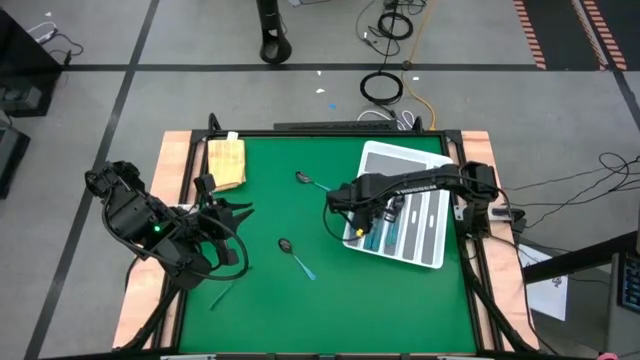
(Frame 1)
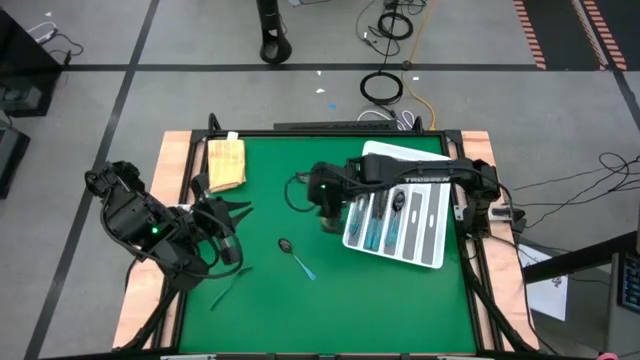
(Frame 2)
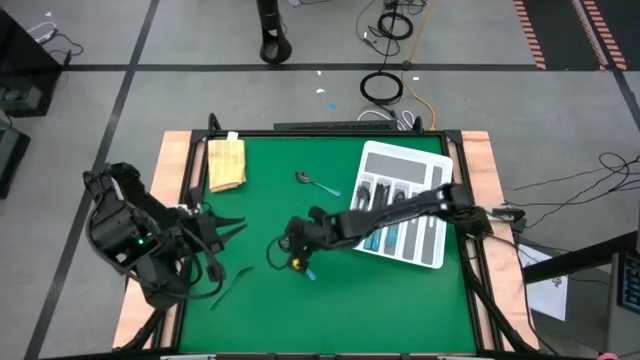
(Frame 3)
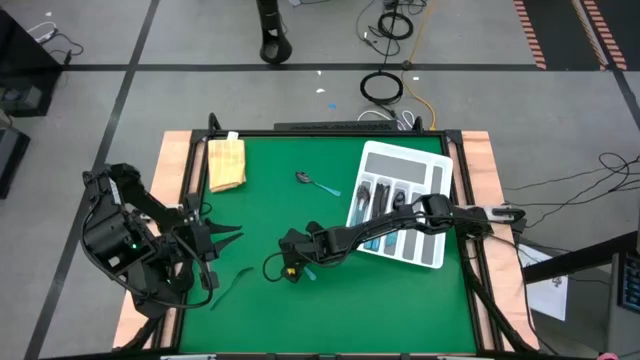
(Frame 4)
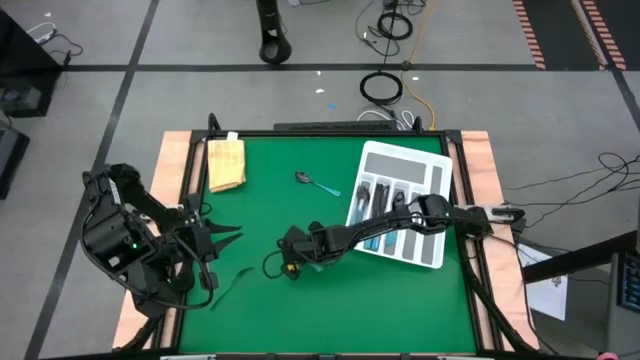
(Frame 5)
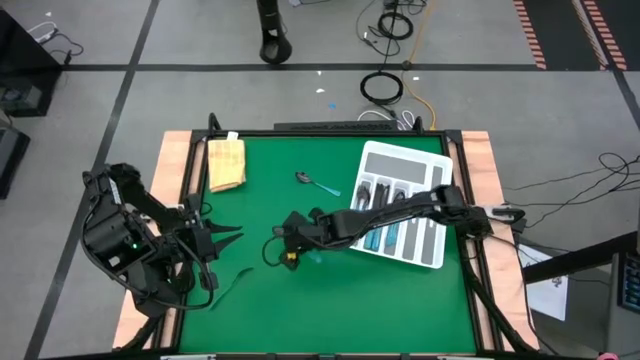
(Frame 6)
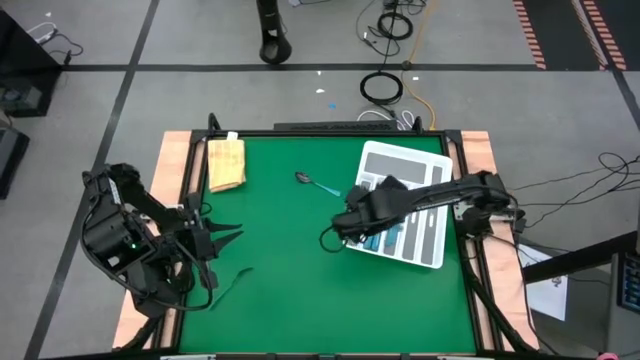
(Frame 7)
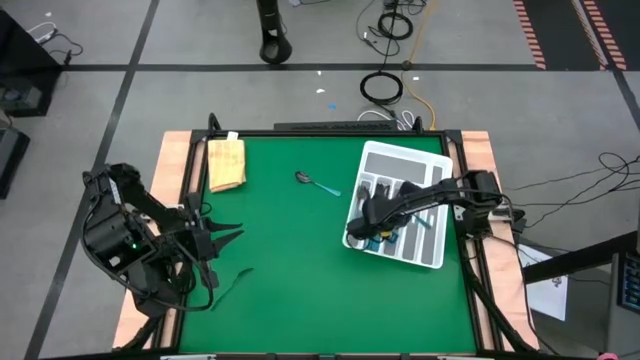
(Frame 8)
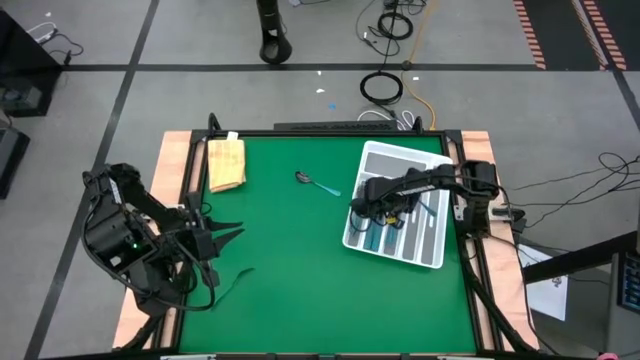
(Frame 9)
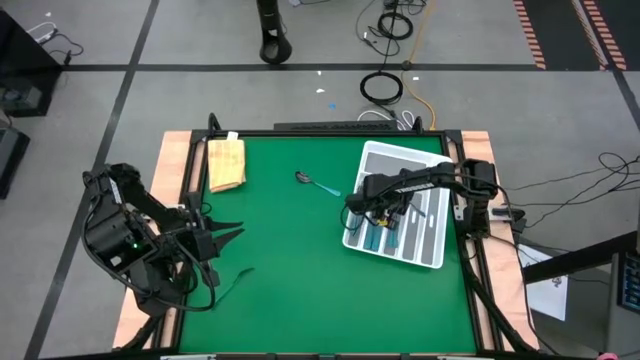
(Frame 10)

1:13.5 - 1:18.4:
Task: Sort silverware
Put the blue spoon into the white cutlery tray

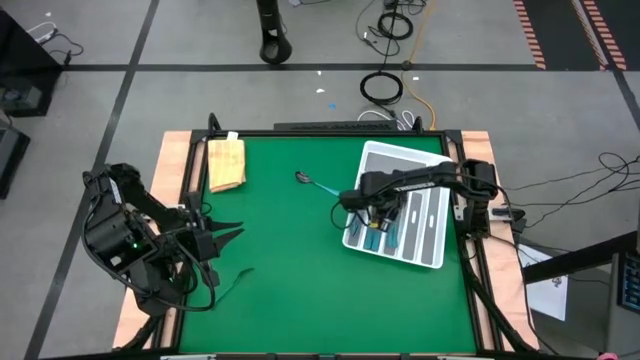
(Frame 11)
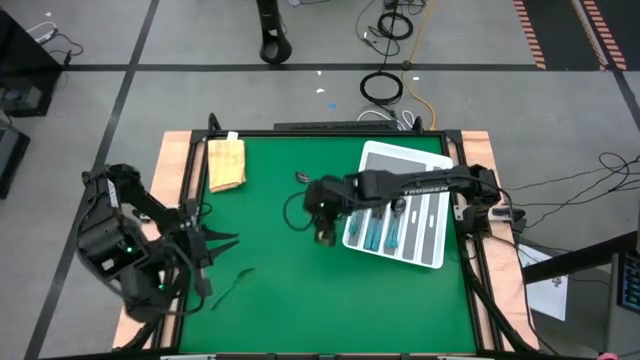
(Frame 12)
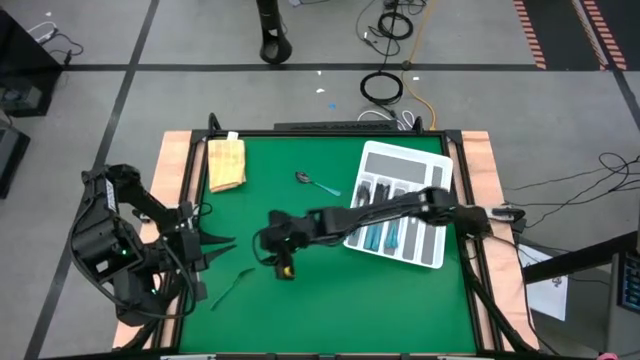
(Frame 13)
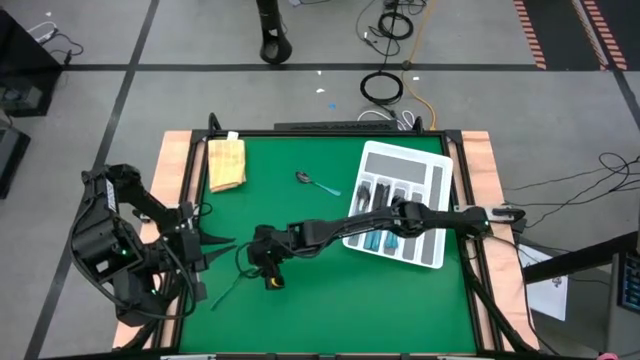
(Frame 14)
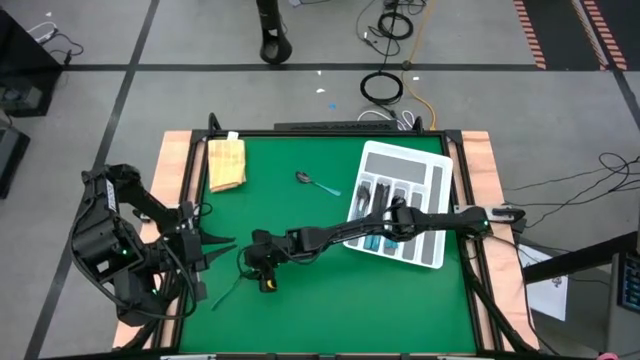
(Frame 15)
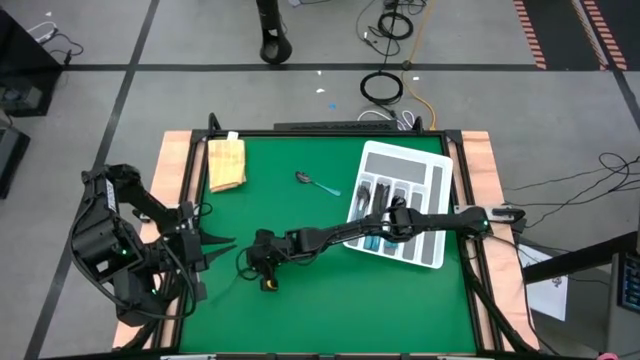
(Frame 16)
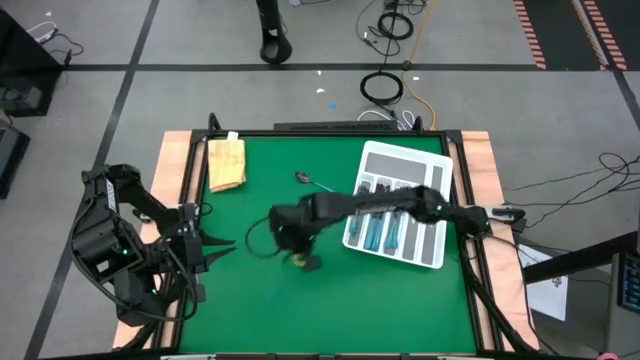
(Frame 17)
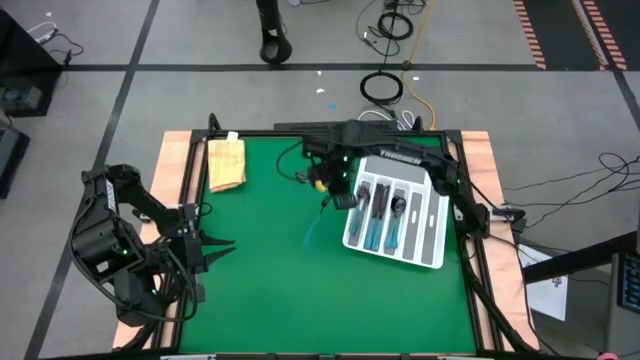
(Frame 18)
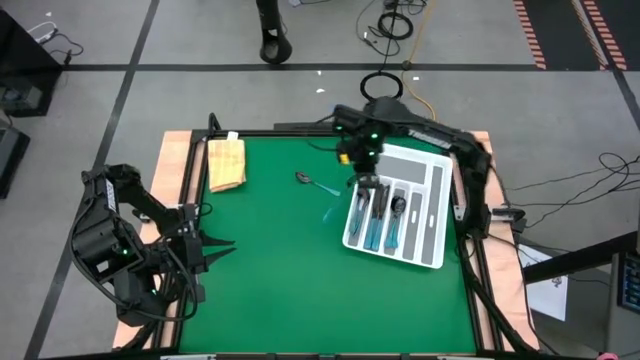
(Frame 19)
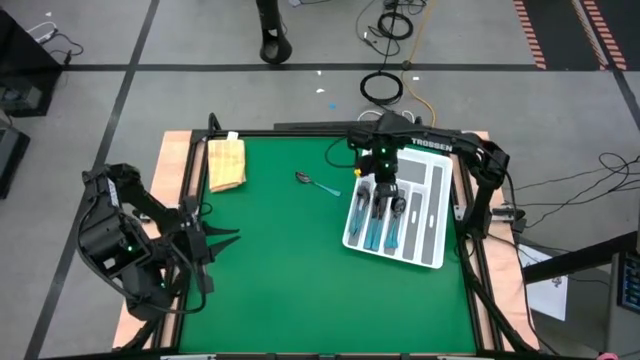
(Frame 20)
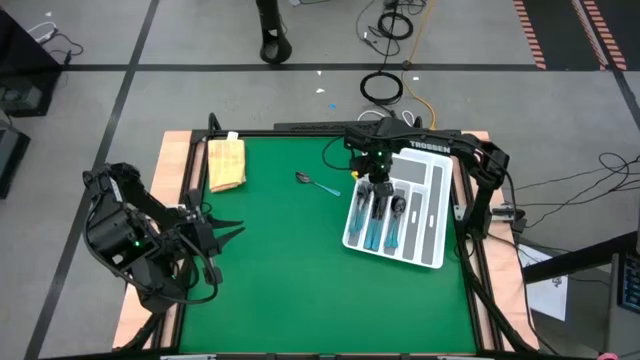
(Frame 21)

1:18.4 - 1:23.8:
Put the blue fork into the white cutlery tray

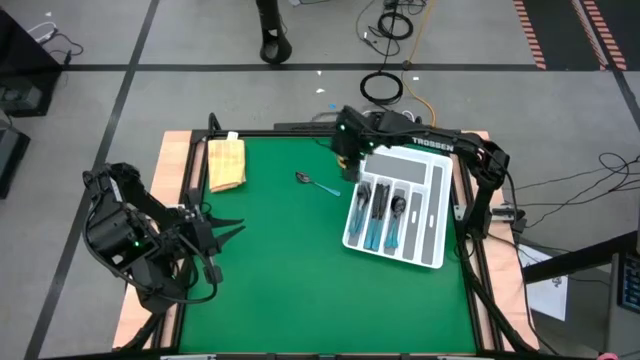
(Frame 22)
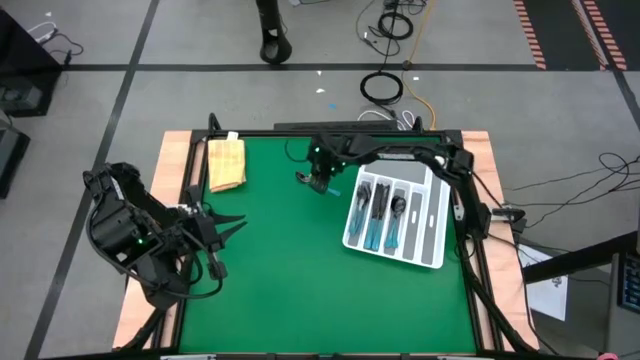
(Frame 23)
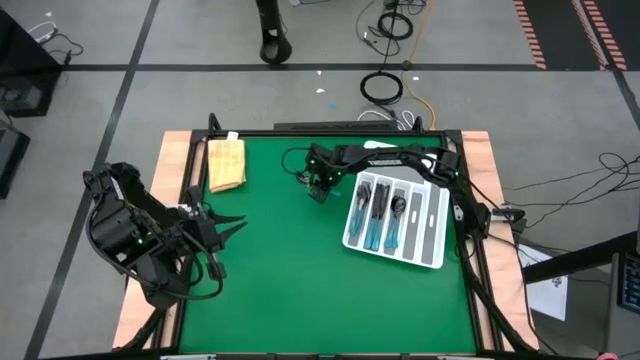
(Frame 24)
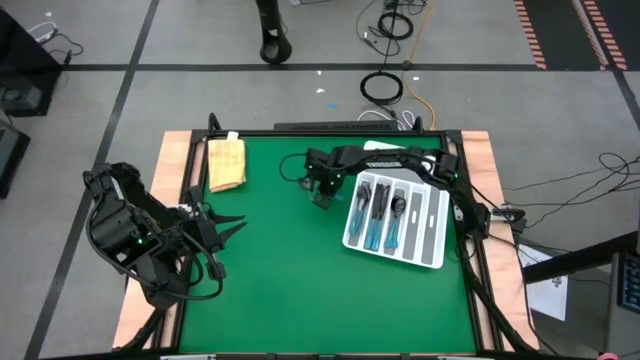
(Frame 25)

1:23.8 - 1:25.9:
Put the blue spoon into the white cutlery tray

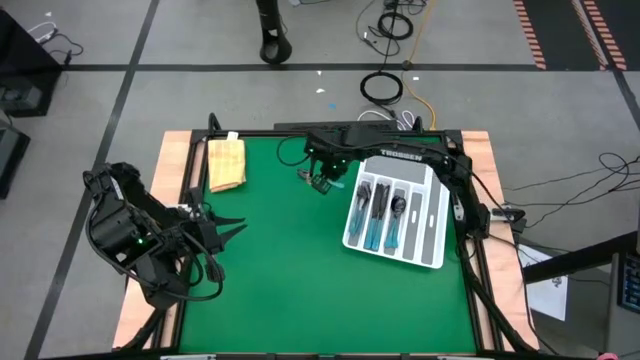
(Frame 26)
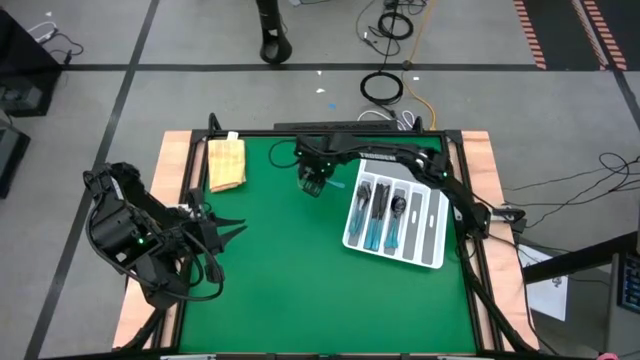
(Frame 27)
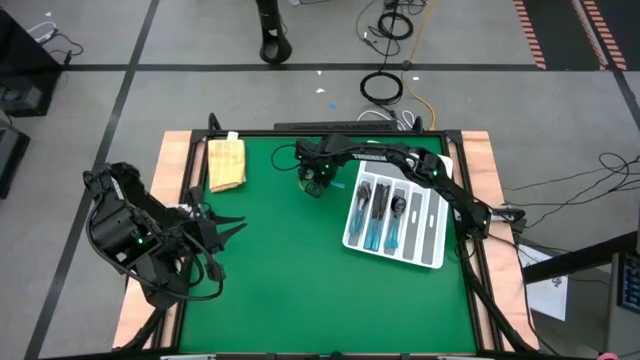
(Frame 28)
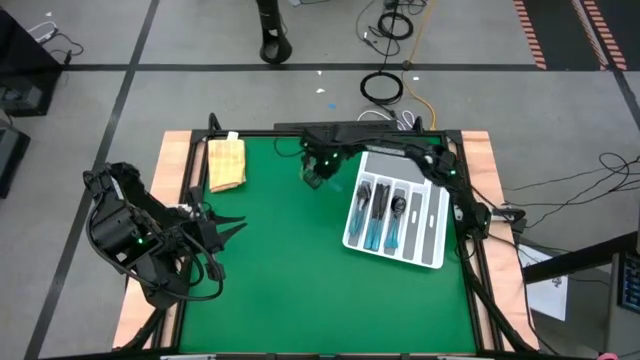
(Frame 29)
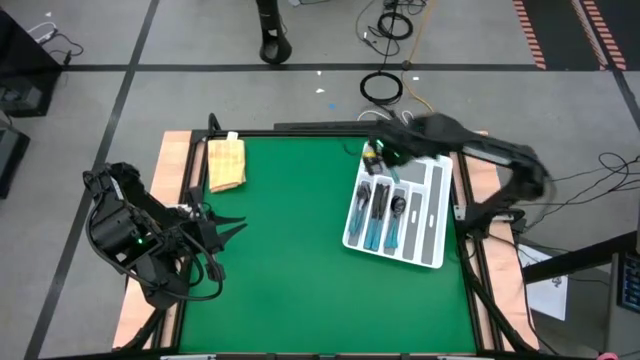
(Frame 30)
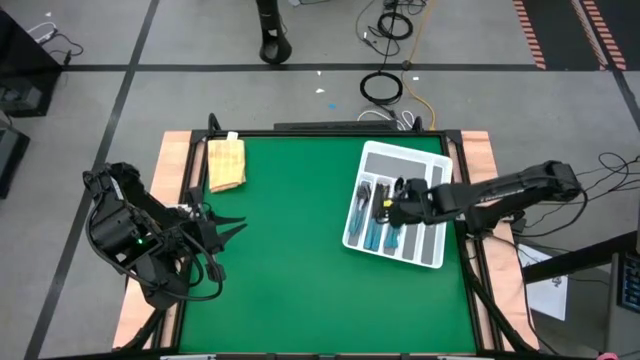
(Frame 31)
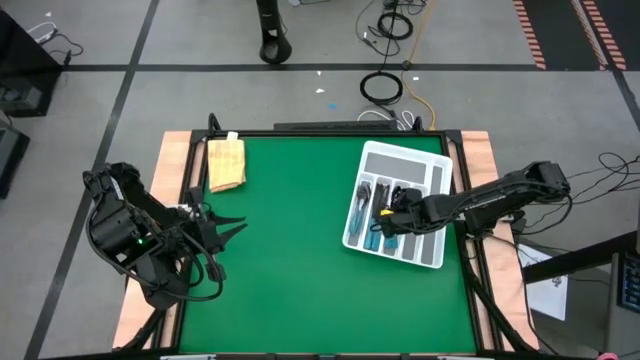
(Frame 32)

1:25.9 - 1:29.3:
Put the blue spoon into the white cutlery tray

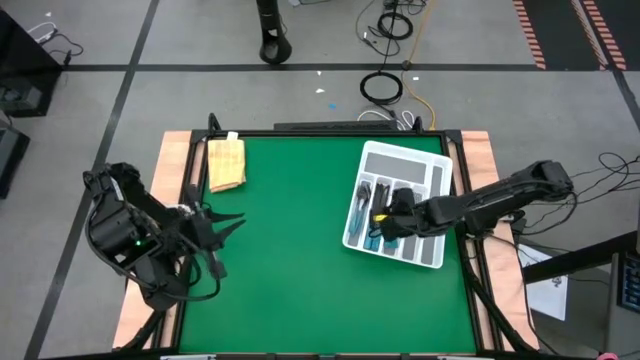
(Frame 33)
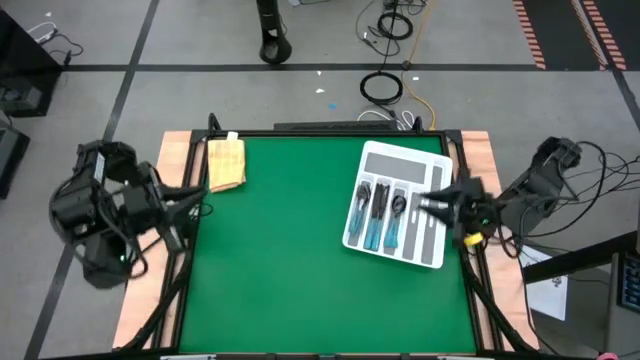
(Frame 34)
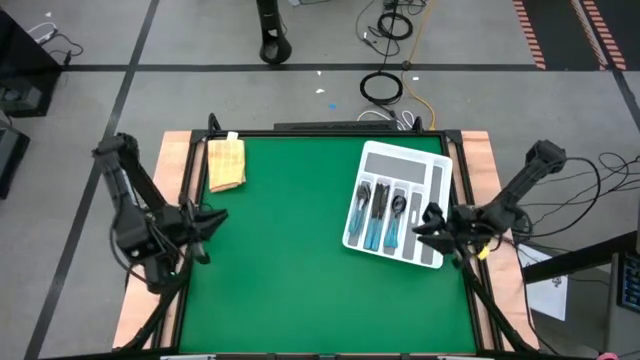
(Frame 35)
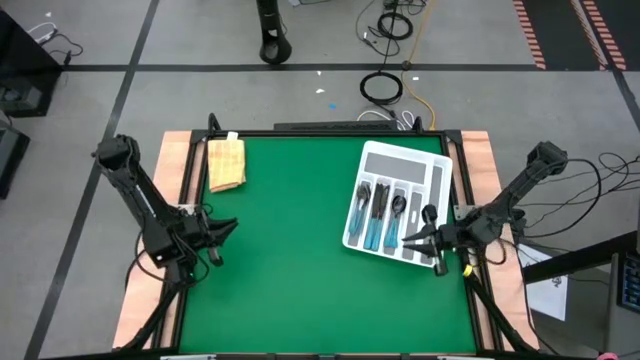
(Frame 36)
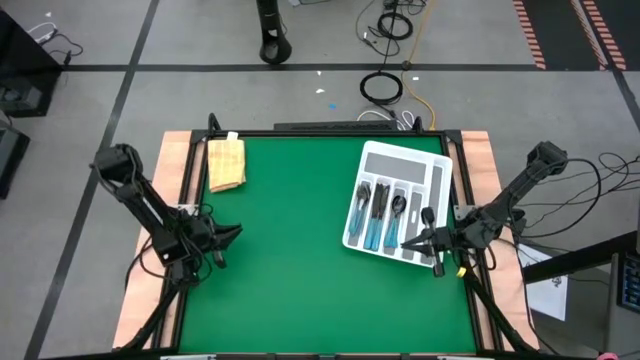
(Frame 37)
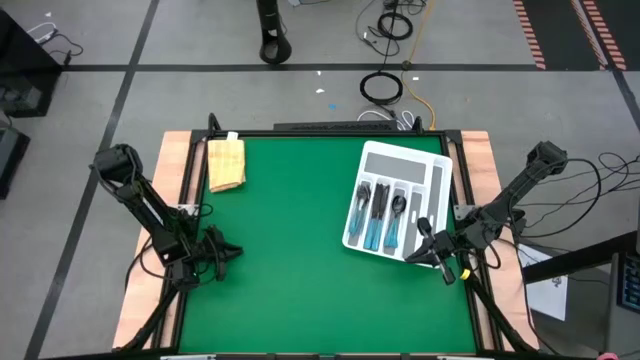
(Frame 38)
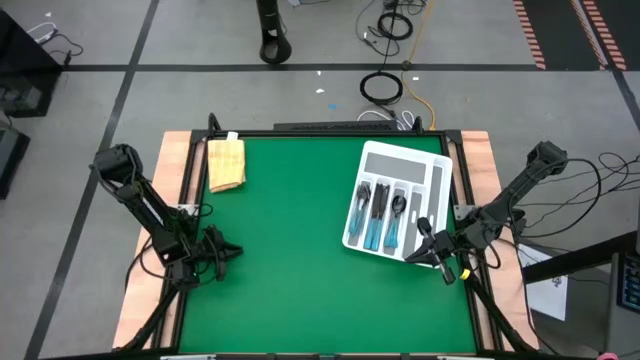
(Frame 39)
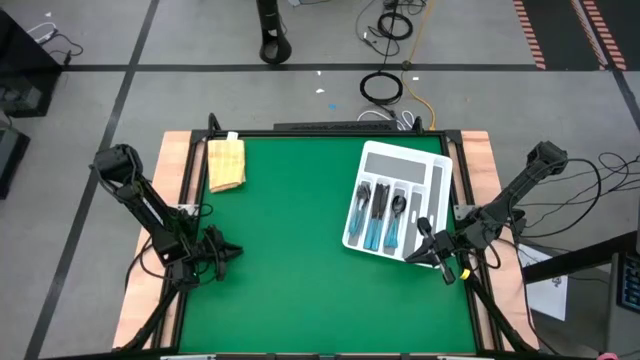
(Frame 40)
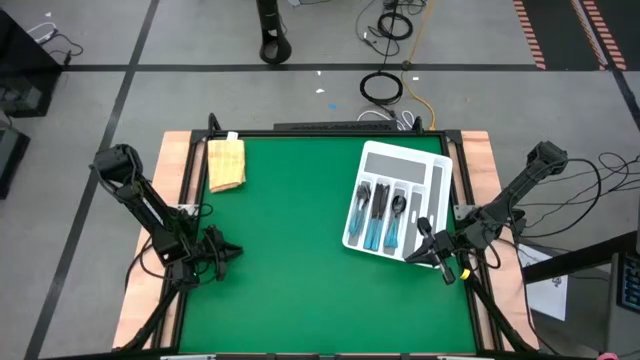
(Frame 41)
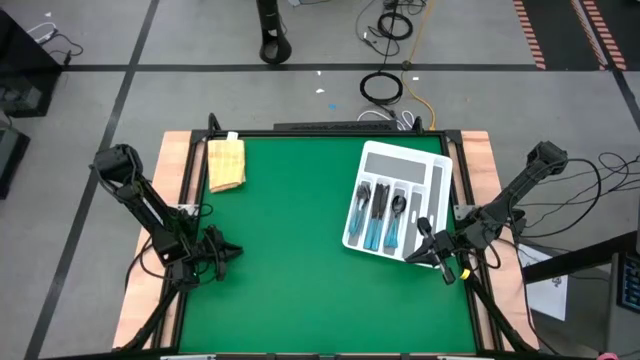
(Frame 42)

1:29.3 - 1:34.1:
Return to Home Position
